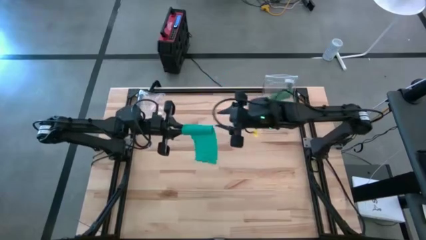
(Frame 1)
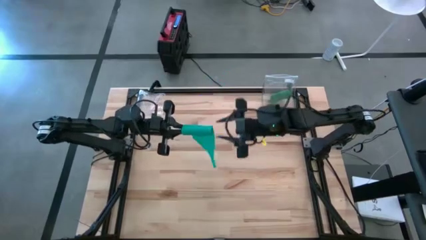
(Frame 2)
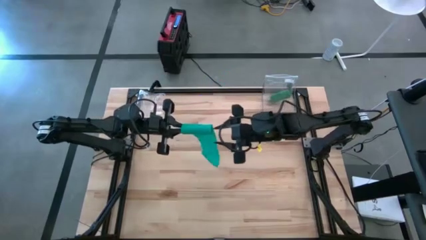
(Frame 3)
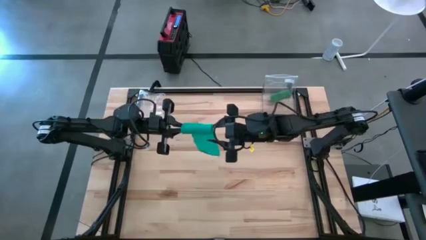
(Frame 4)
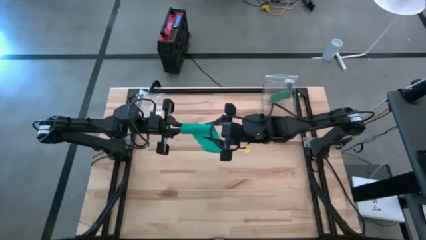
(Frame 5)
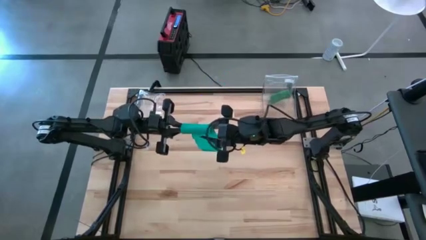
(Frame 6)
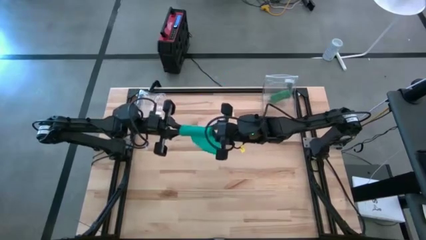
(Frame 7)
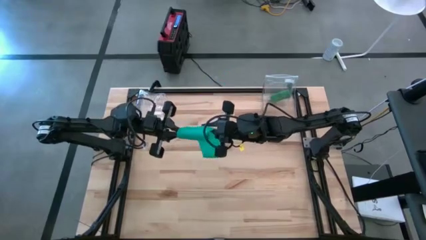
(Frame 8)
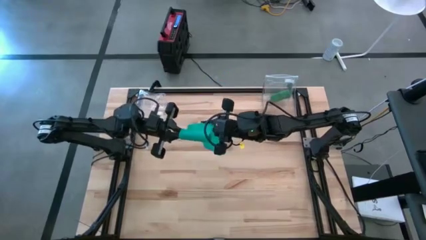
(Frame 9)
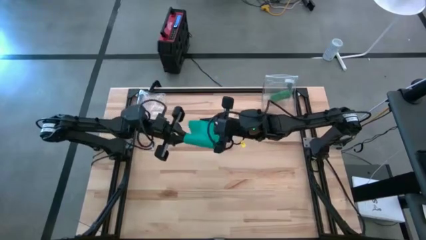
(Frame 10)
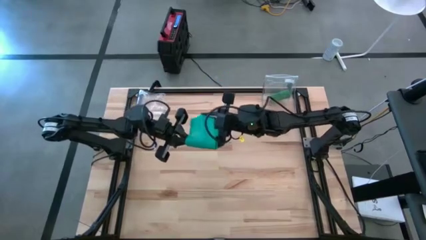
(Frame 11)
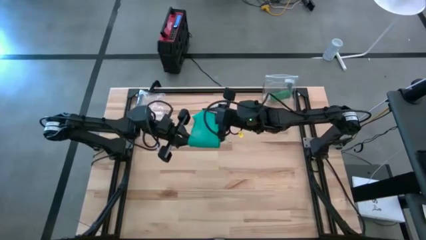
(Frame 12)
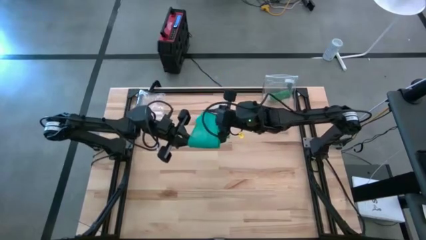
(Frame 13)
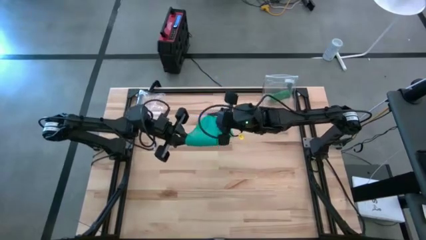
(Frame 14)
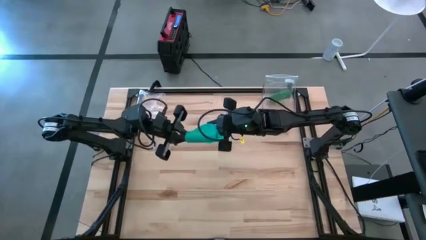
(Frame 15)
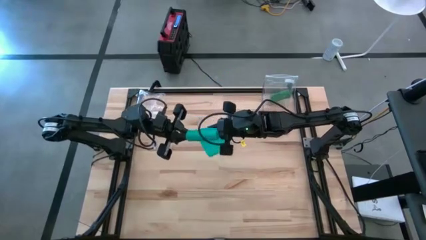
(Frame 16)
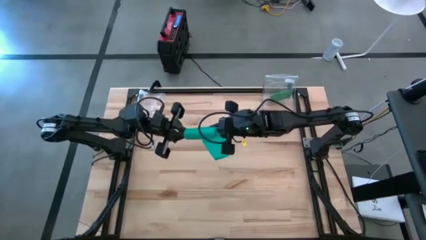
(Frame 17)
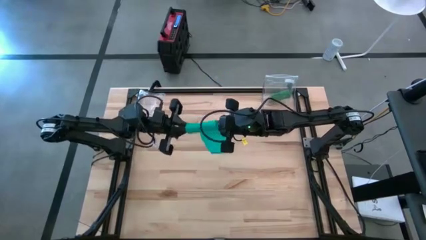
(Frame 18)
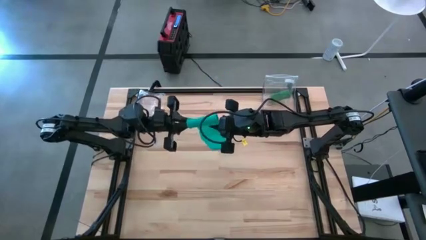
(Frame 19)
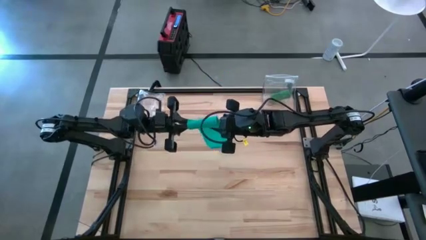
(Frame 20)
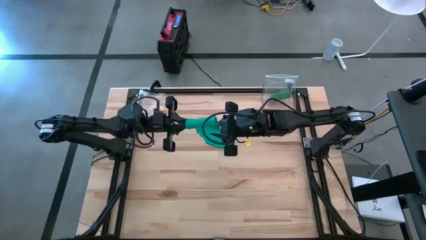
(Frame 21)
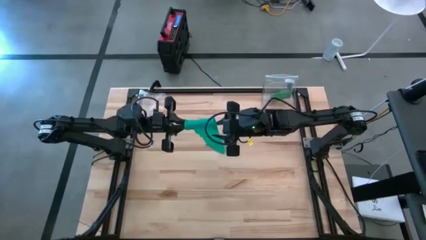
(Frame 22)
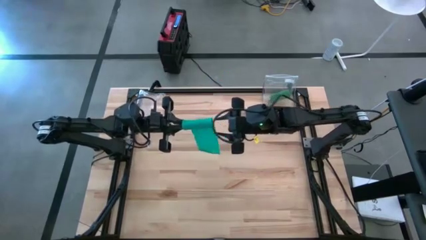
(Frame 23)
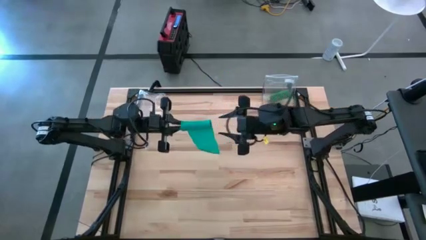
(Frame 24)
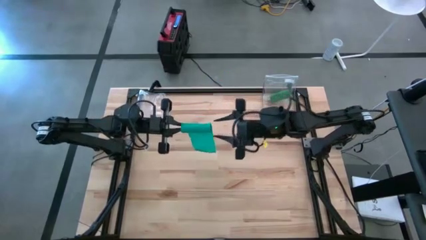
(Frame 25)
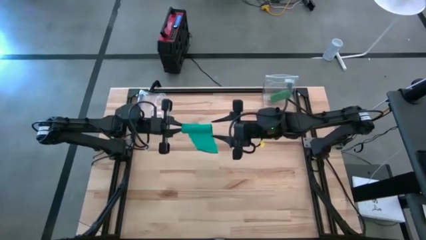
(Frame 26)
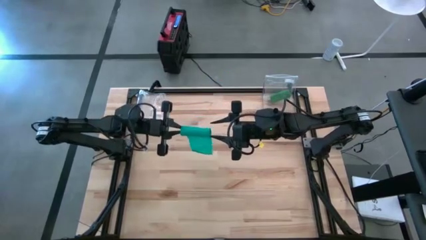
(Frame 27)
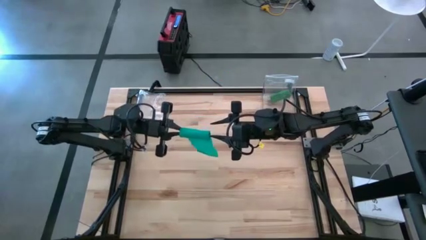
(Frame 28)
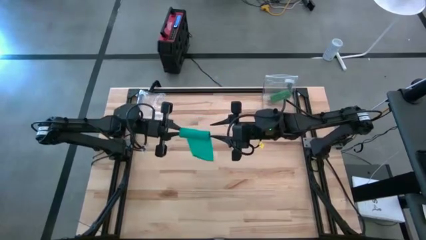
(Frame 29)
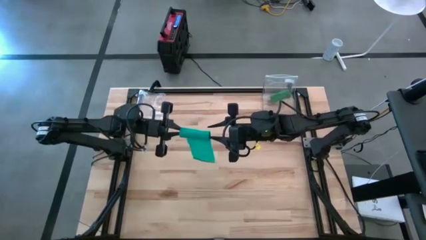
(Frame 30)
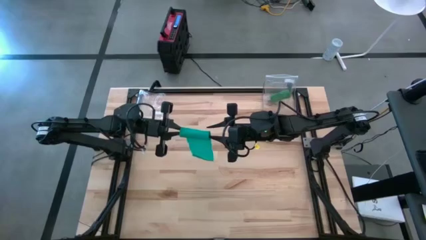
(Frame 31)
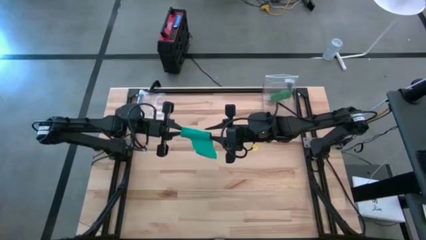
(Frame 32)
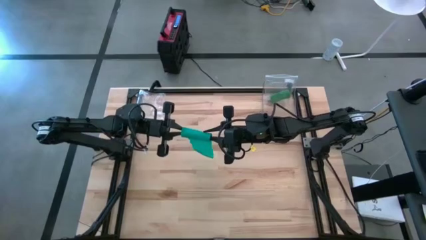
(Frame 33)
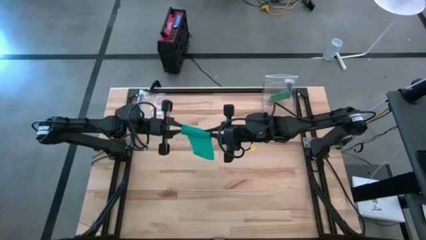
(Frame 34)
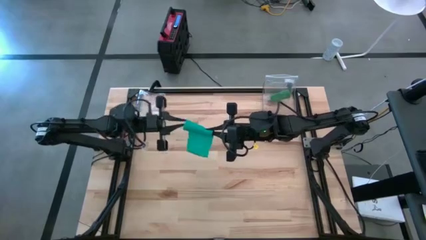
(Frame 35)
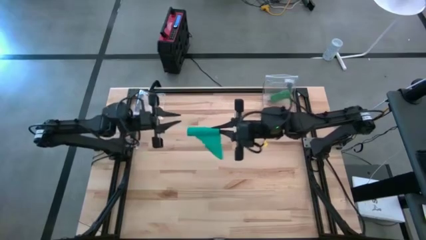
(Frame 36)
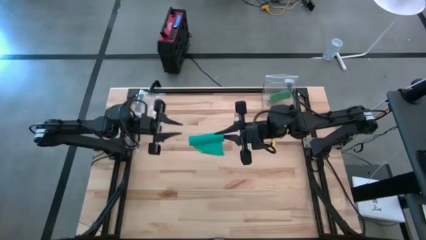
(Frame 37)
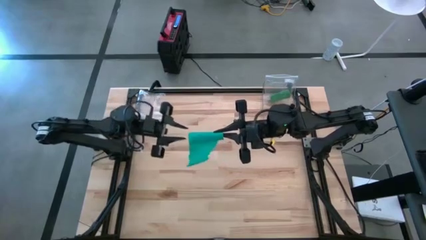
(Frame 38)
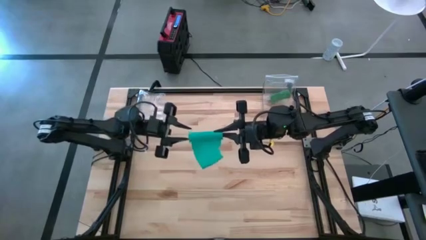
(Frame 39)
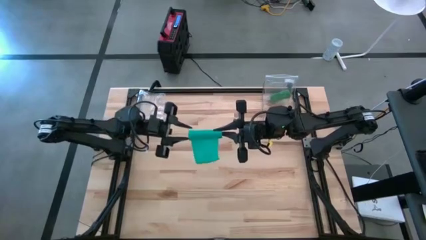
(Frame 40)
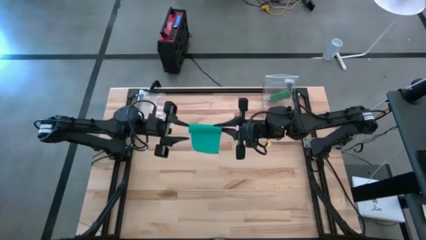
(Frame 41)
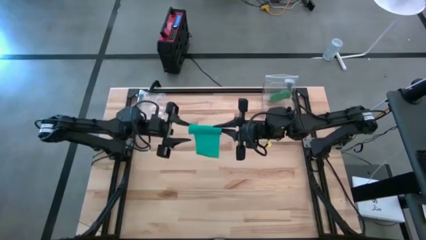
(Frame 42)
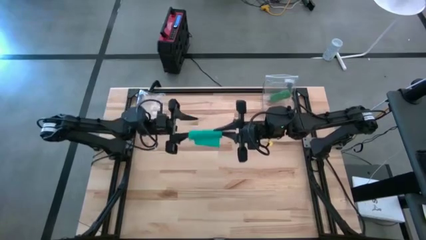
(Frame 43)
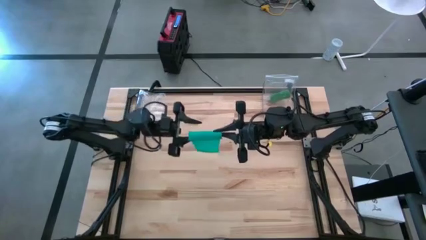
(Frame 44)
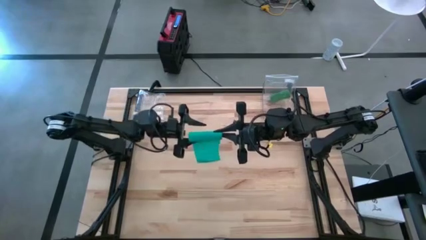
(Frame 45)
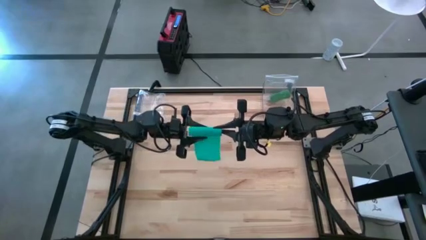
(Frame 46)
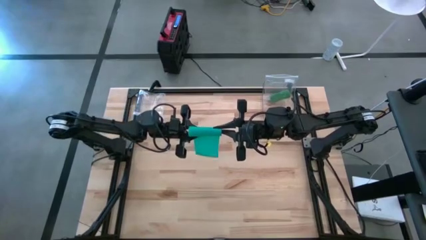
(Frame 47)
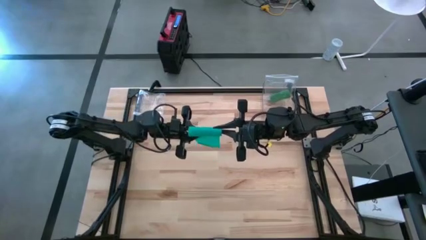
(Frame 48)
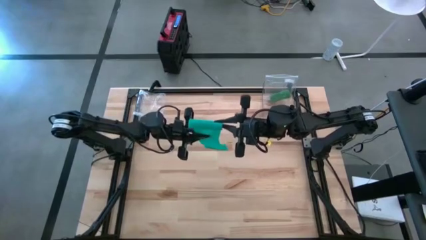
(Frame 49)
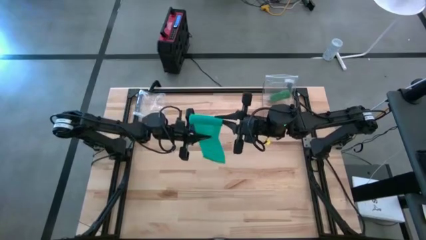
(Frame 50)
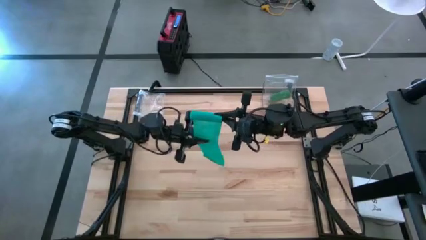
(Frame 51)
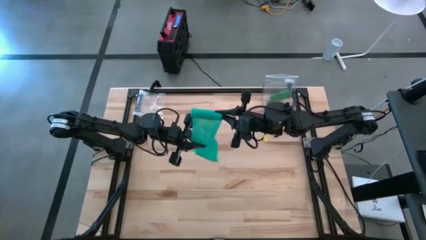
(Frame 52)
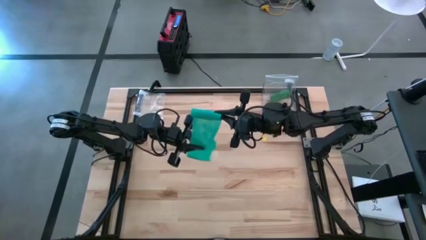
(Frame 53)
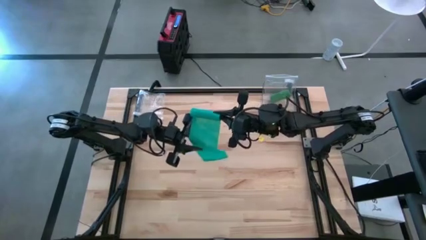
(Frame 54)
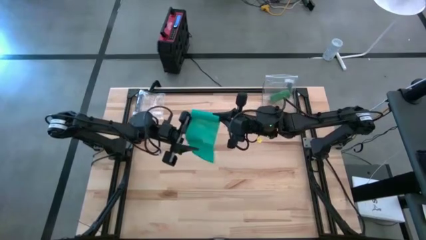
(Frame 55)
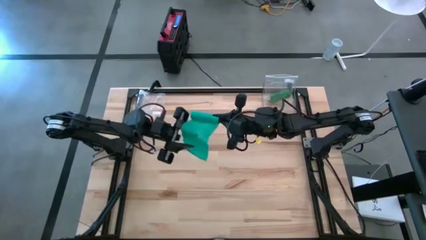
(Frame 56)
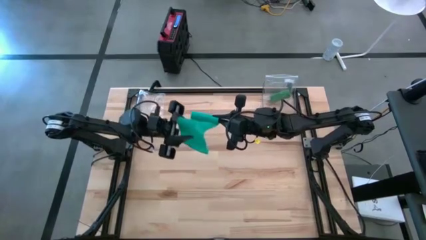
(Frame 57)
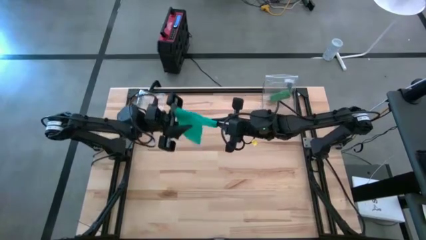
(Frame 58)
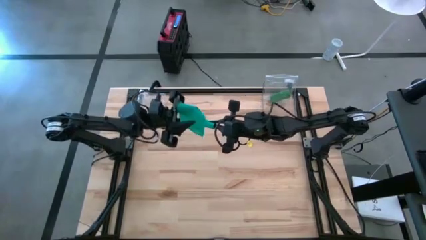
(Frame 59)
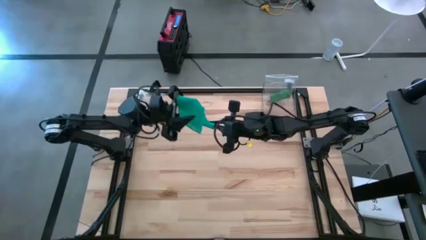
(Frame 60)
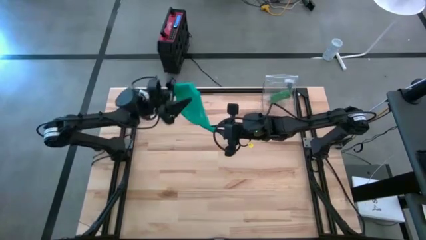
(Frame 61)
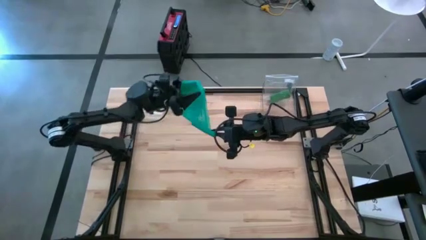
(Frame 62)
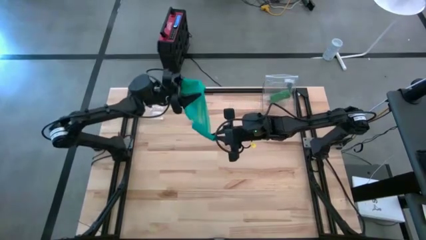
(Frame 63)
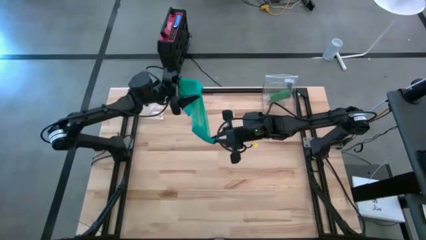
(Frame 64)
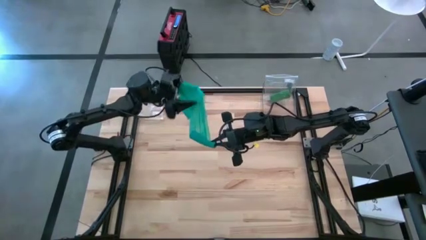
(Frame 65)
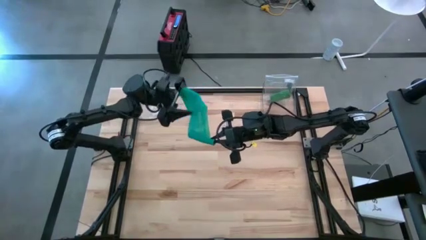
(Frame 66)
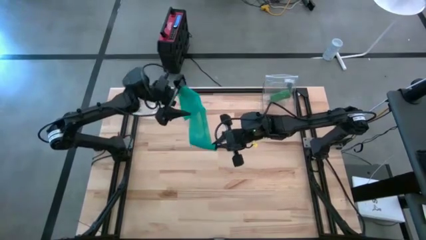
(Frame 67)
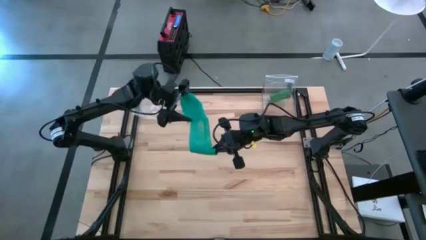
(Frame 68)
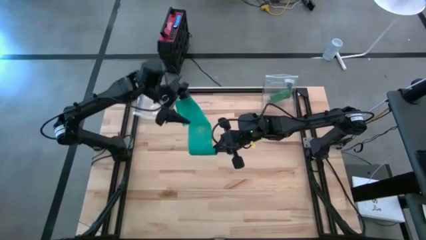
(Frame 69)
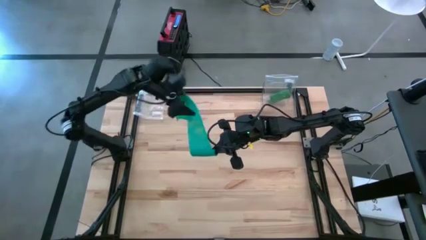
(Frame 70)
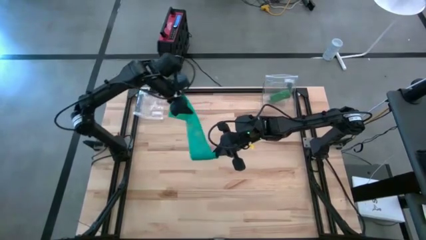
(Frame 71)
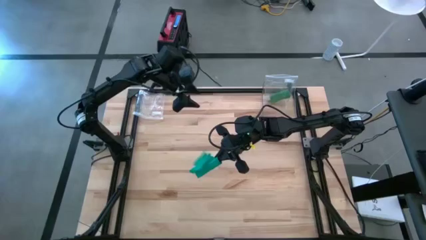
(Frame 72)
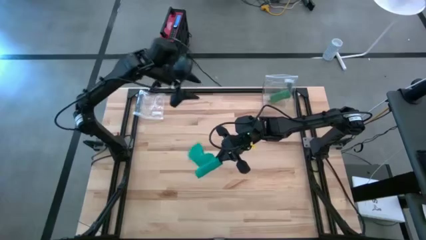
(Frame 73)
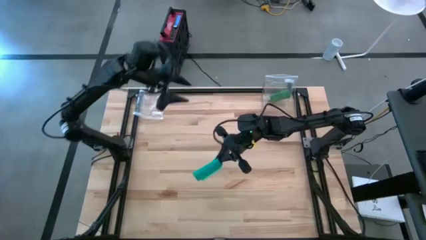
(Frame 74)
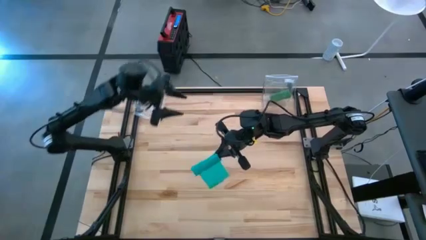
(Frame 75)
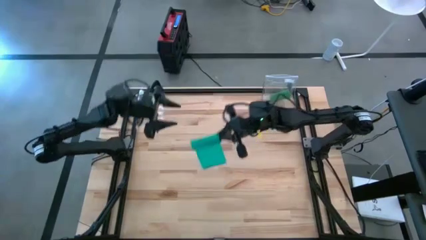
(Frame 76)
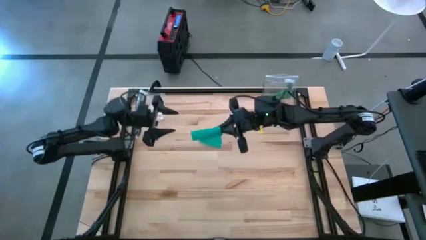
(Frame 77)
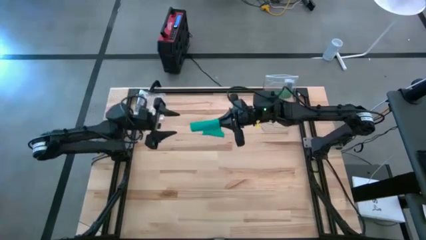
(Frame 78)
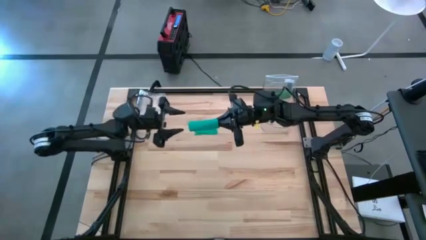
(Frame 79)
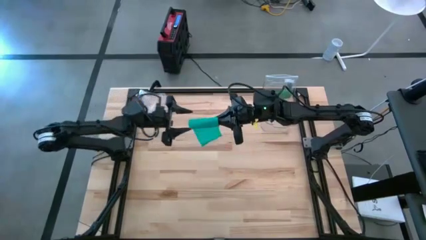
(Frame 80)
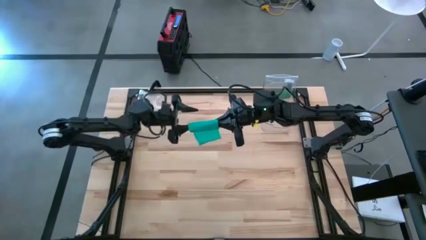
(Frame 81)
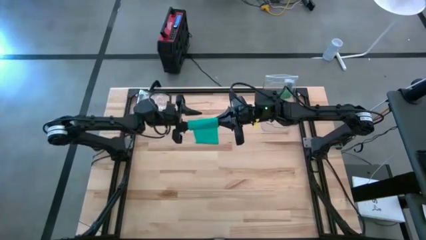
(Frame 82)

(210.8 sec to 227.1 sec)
Task: Roll bandage
Roll the dark green bandage
